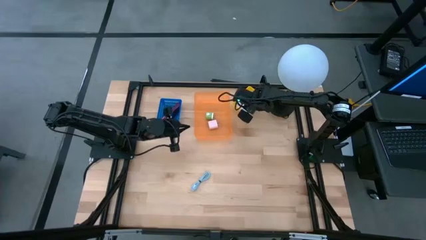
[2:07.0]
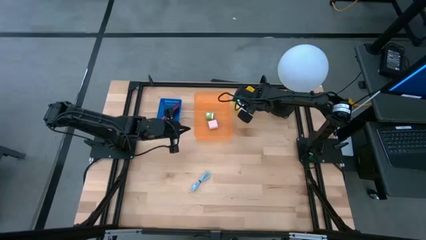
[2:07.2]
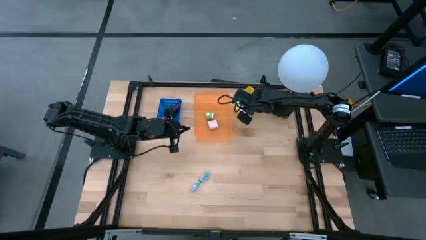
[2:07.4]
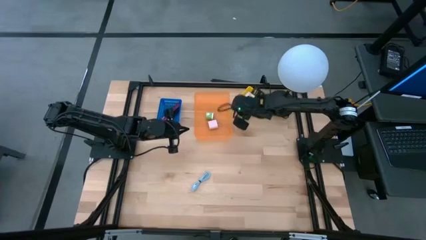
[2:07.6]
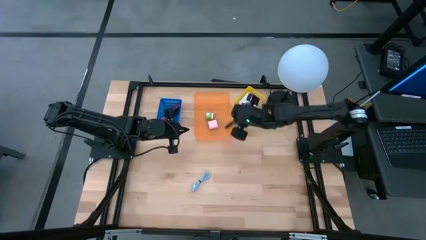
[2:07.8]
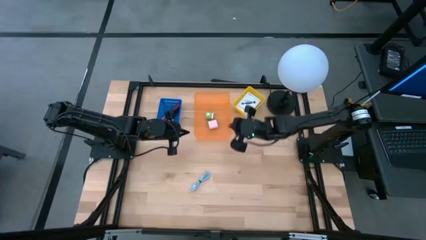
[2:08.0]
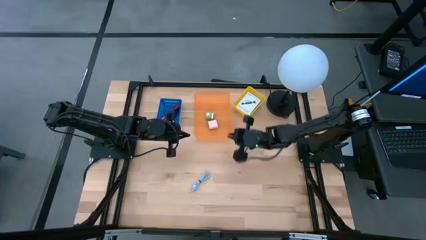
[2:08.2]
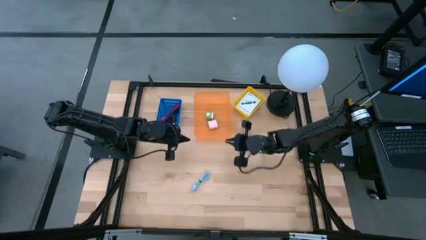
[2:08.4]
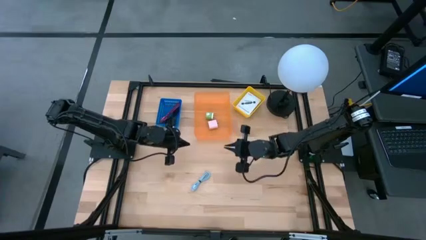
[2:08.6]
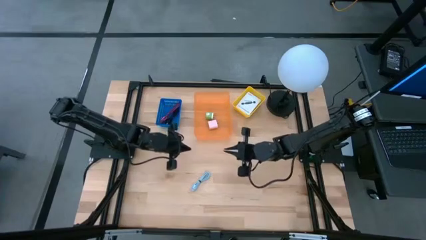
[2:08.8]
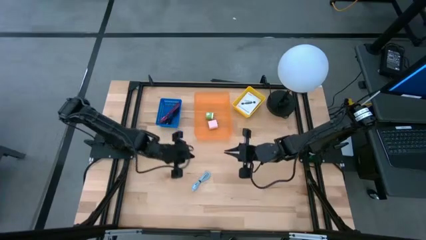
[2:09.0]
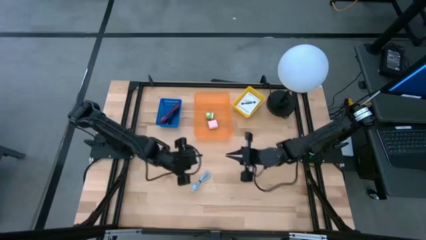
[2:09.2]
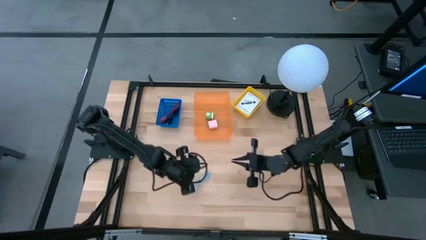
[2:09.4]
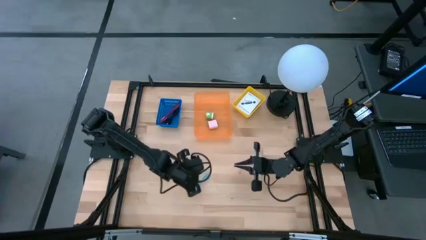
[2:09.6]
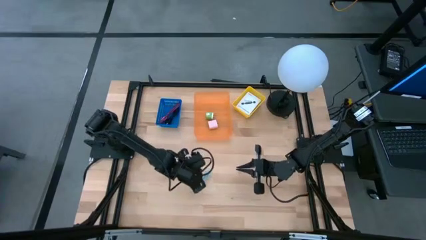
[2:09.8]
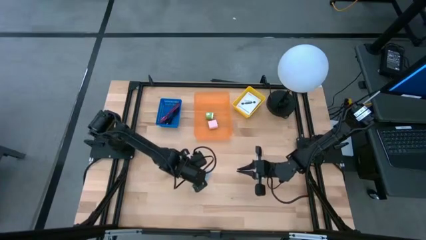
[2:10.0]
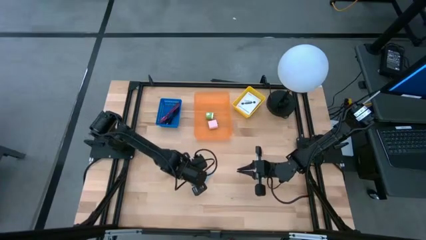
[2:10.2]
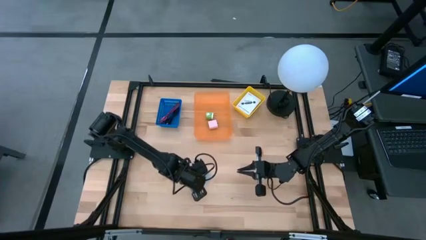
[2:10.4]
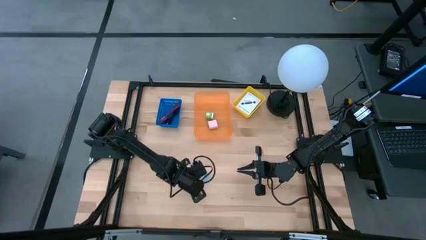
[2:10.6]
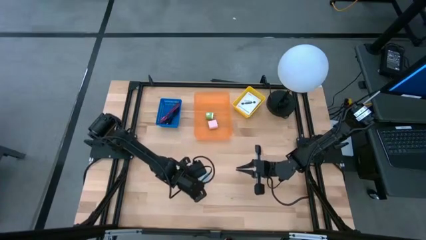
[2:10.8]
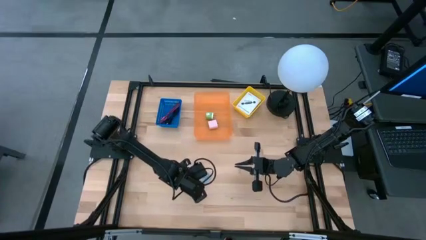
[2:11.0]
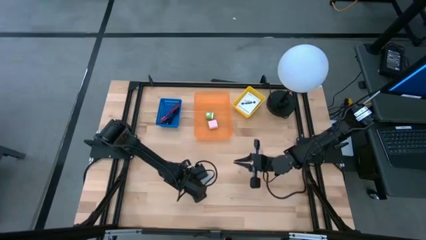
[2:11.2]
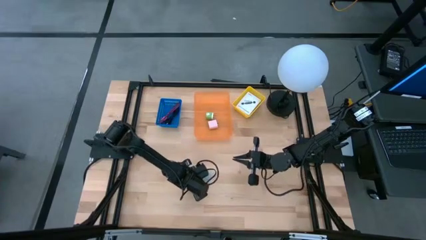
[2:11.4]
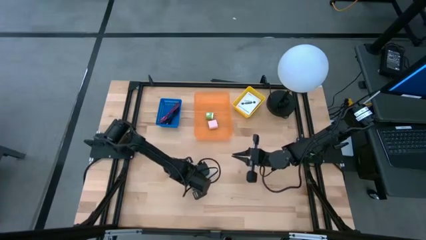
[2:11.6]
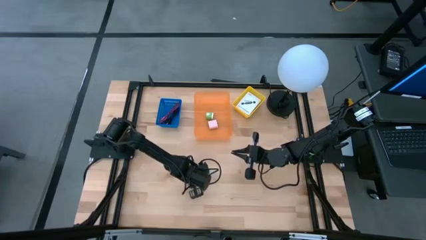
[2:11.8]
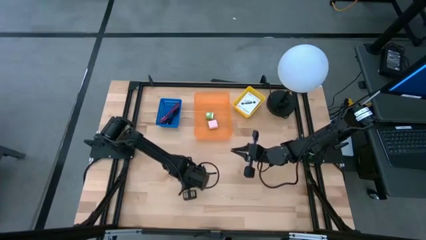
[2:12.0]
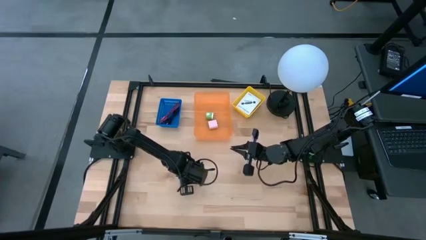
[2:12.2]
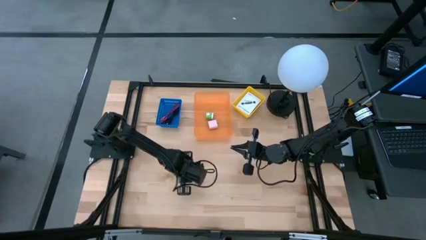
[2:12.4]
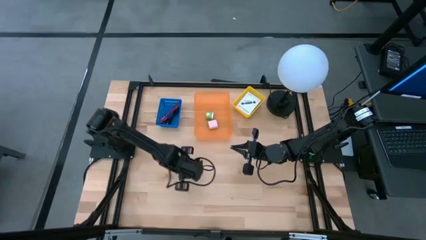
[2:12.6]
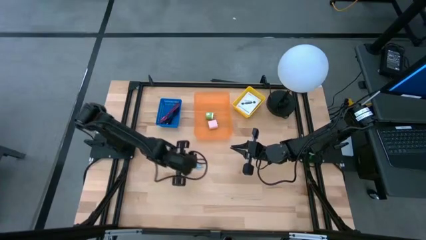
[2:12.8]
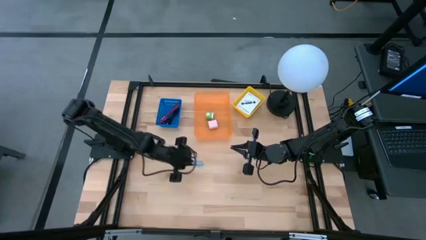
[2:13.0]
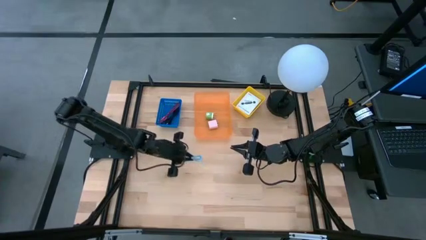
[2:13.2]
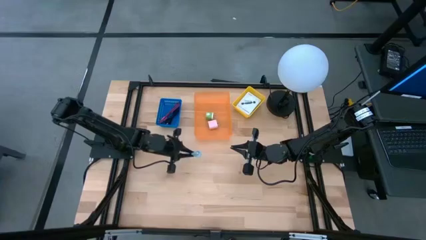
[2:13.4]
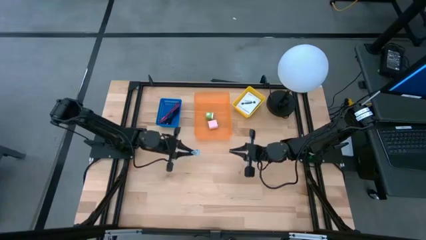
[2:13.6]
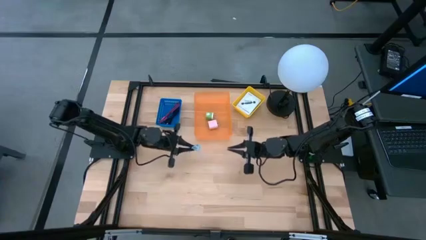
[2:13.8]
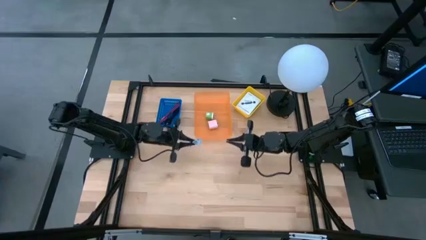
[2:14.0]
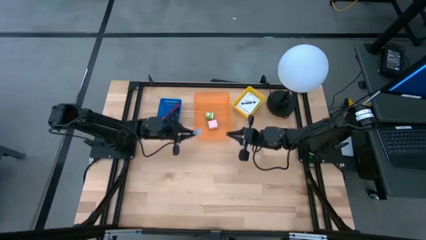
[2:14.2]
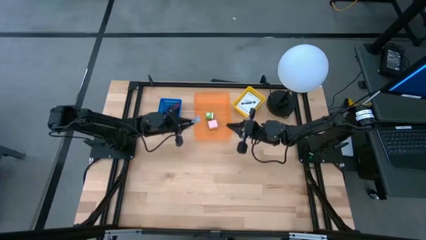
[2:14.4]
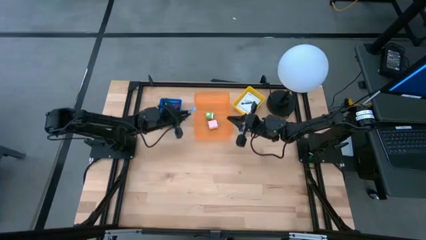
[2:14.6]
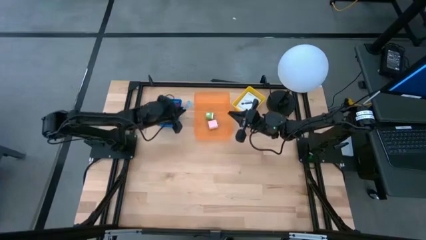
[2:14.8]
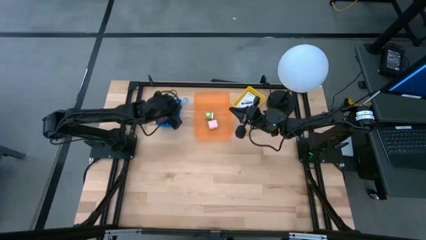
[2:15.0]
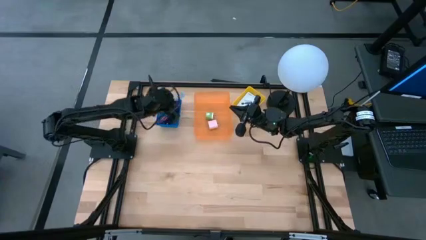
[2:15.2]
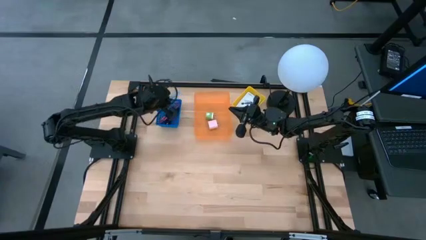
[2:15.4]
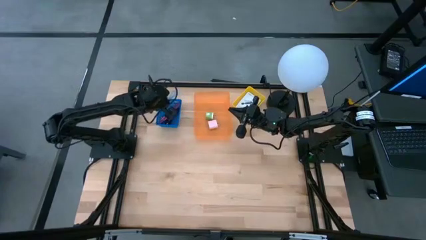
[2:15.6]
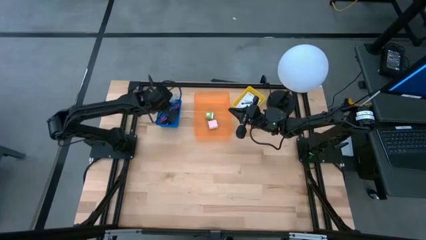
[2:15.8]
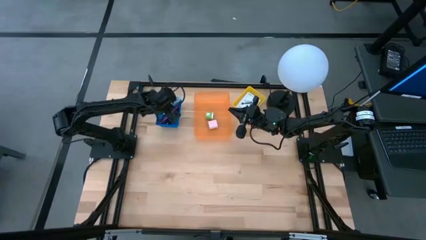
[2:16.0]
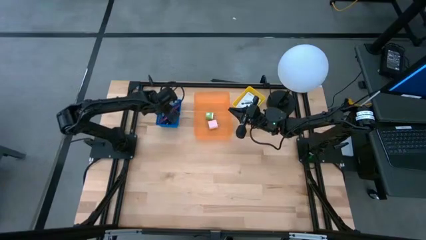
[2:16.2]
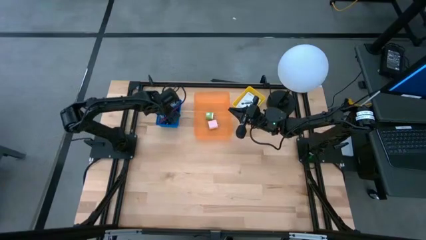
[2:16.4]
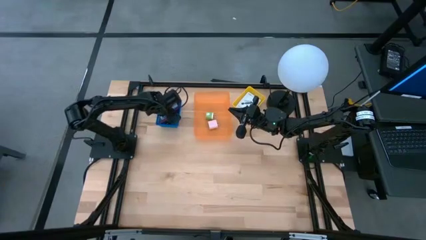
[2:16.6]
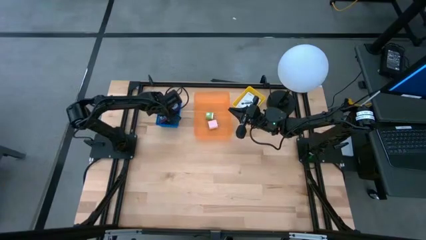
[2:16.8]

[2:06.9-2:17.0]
Task: Pick and place items into bin
Put the light blue USB cable wire into the blue basket

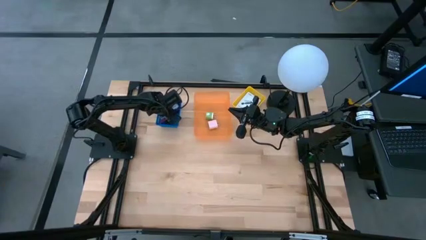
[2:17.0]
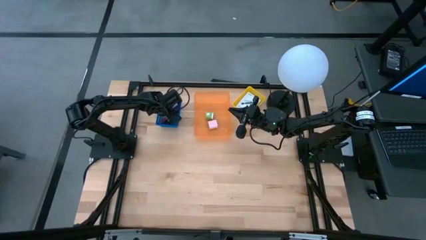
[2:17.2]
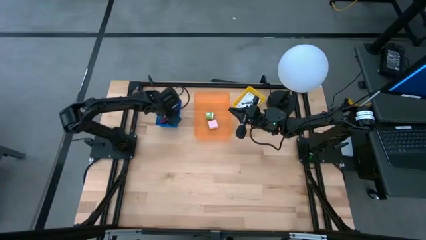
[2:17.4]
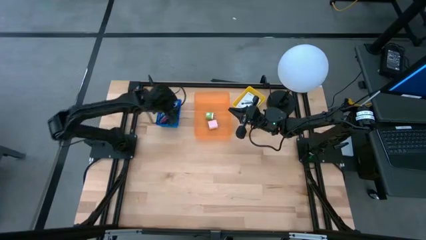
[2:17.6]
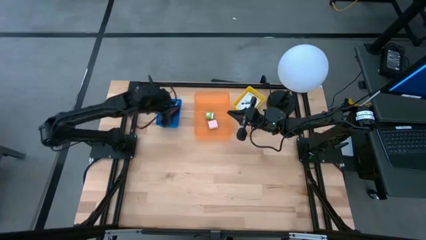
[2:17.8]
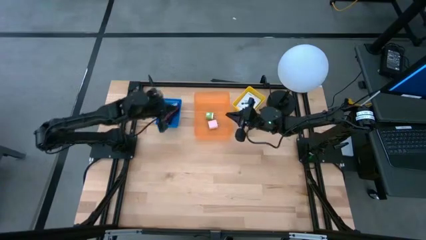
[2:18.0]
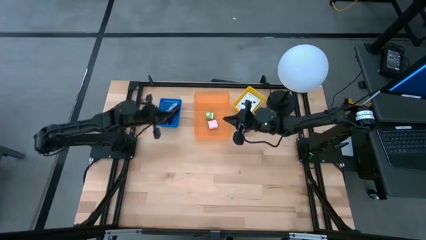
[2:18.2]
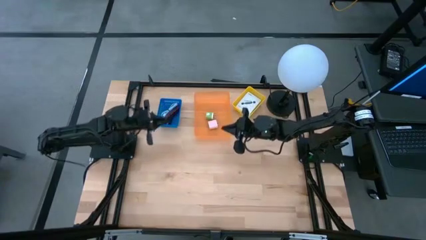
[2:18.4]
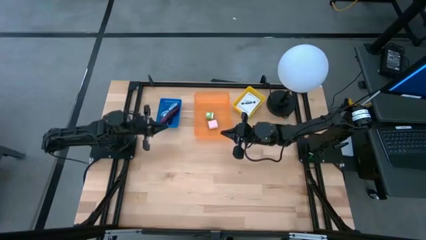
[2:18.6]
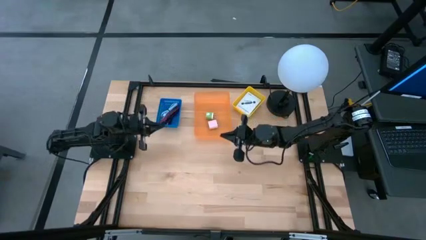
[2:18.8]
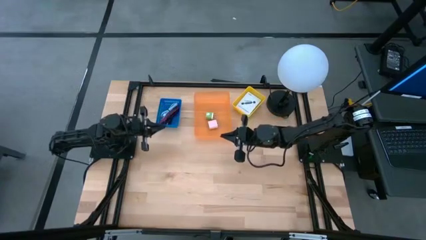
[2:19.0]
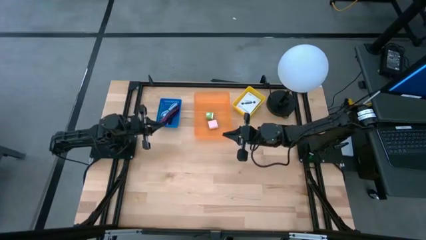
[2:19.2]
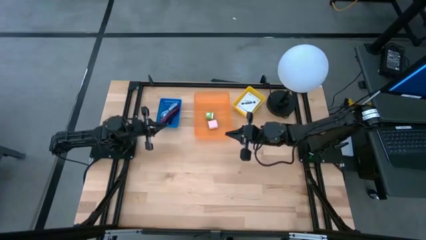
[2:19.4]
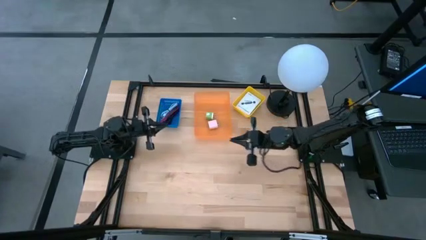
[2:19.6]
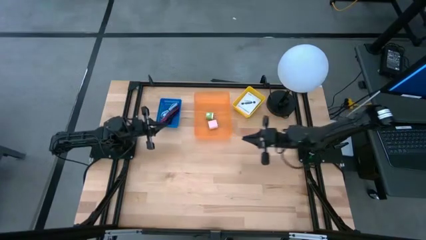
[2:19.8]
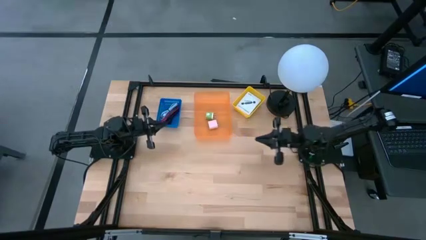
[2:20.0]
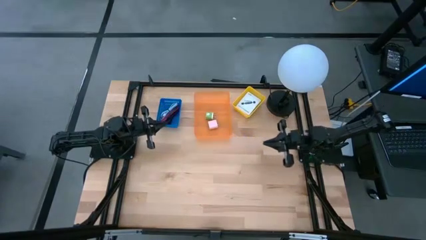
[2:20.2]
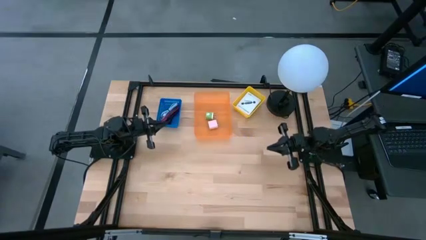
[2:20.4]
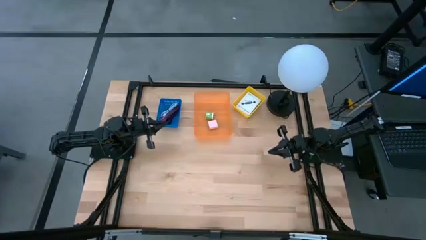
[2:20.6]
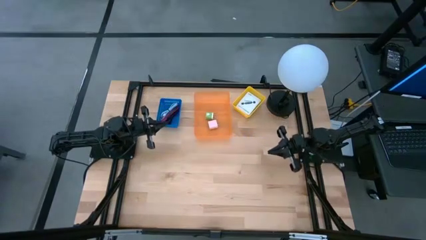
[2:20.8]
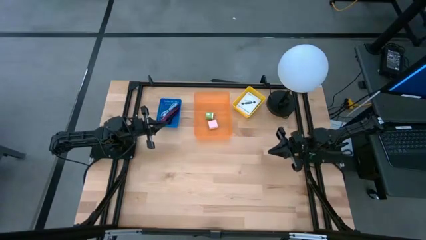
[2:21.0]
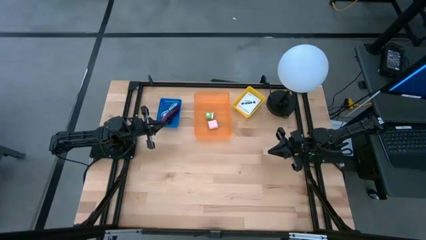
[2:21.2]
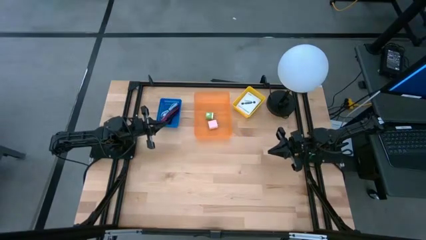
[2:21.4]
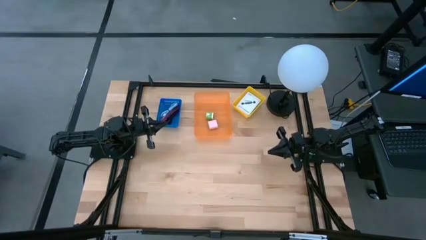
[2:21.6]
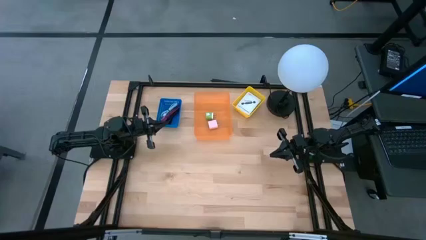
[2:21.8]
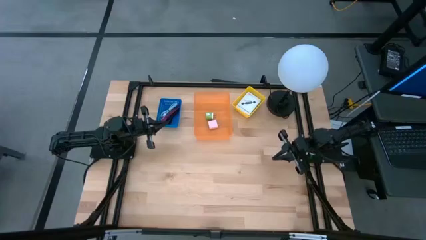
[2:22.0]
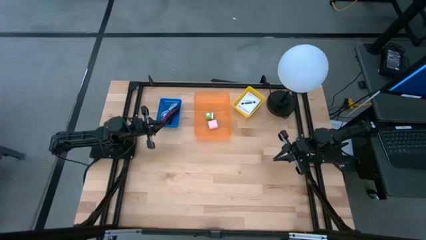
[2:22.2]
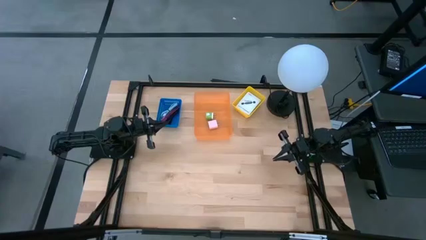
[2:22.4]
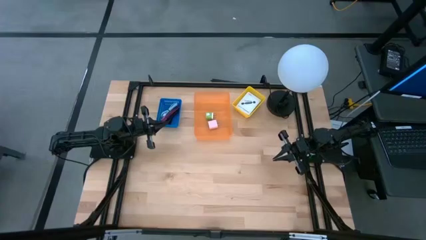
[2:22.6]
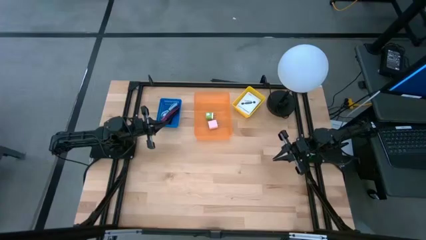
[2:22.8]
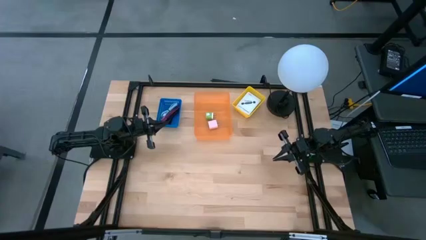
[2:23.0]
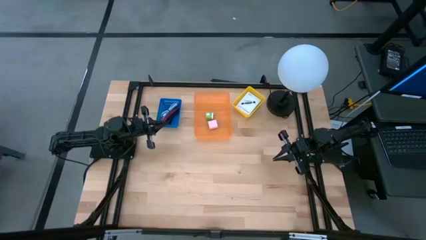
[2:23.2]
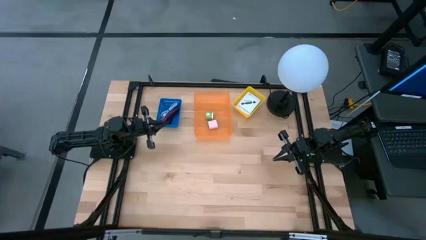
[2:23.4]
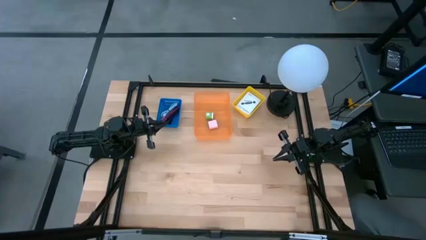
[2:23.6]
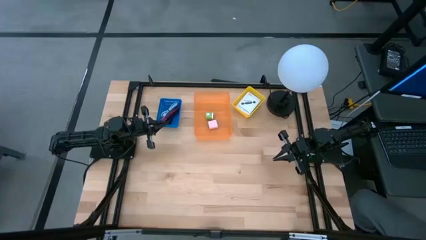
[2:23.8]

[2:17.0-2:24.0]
Return to Home Position
